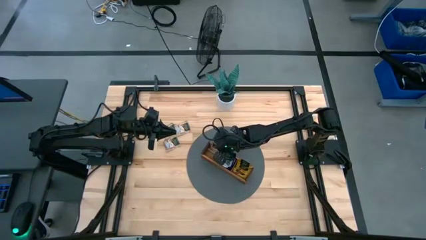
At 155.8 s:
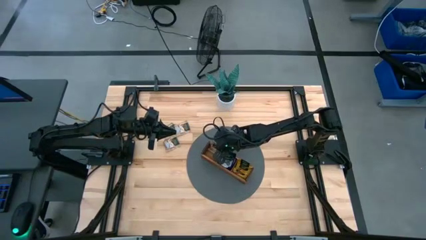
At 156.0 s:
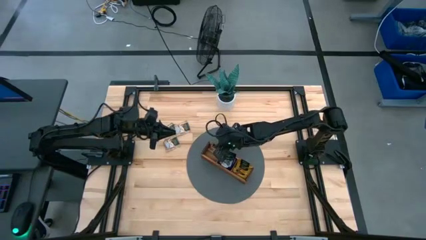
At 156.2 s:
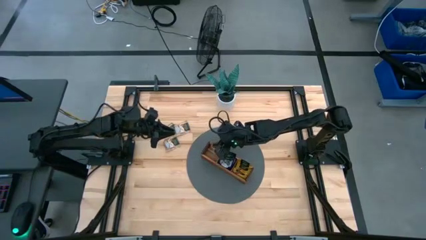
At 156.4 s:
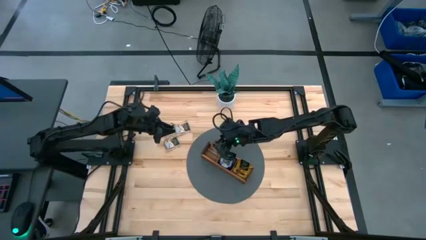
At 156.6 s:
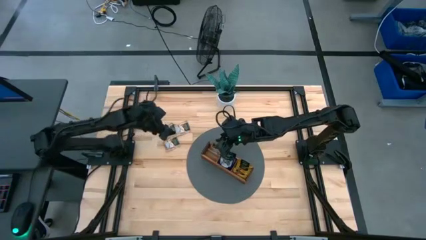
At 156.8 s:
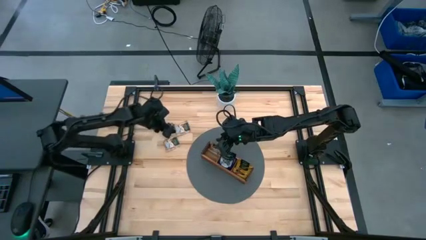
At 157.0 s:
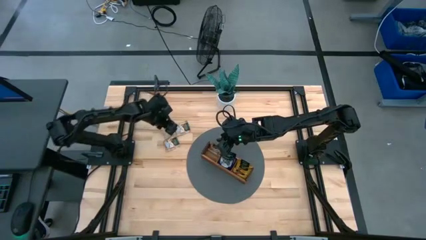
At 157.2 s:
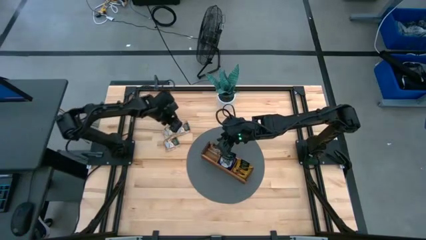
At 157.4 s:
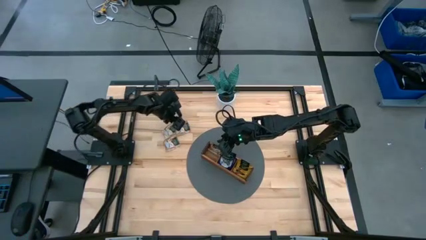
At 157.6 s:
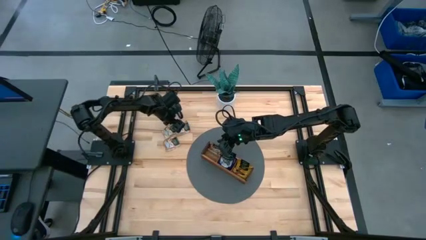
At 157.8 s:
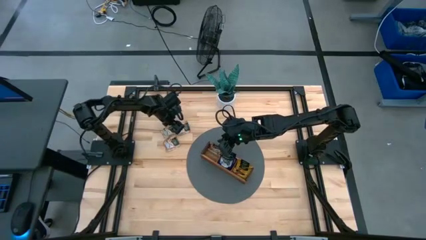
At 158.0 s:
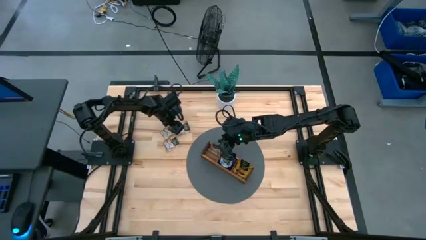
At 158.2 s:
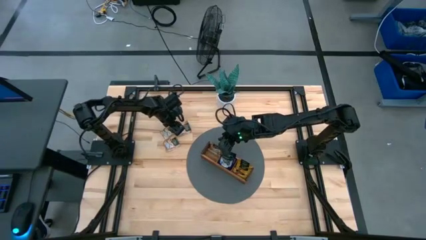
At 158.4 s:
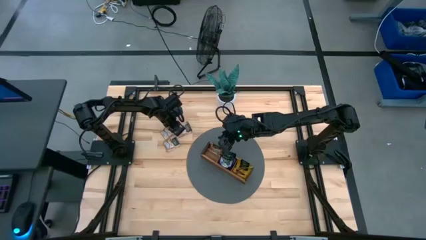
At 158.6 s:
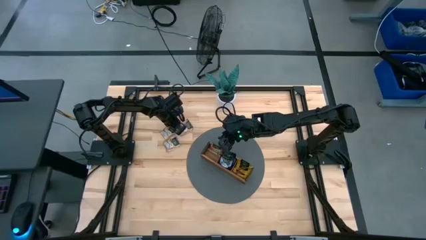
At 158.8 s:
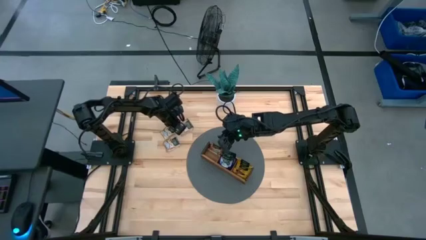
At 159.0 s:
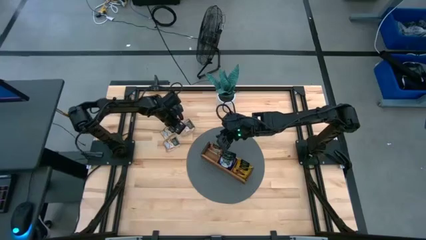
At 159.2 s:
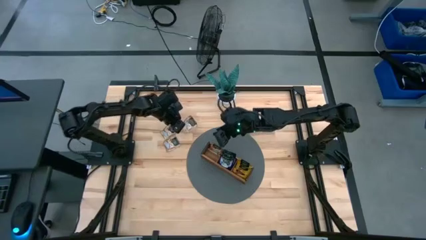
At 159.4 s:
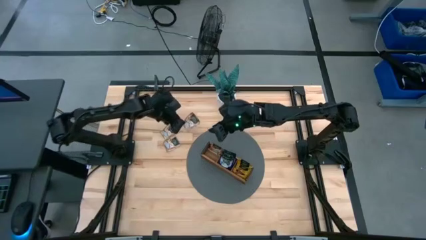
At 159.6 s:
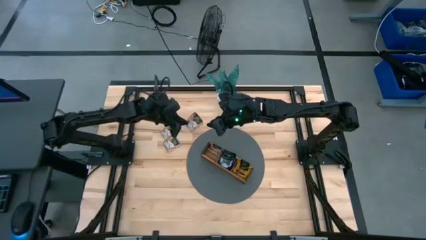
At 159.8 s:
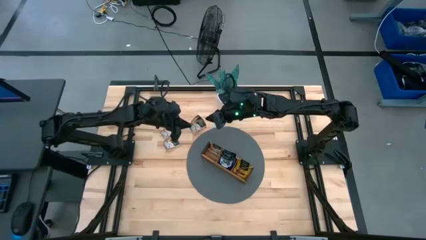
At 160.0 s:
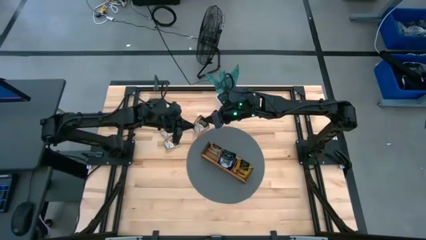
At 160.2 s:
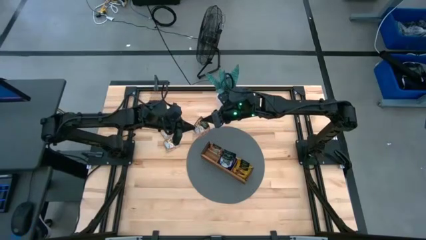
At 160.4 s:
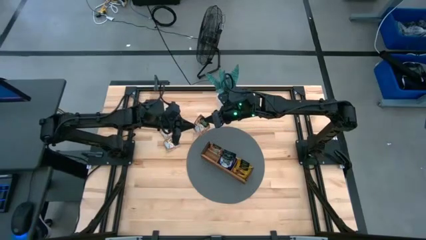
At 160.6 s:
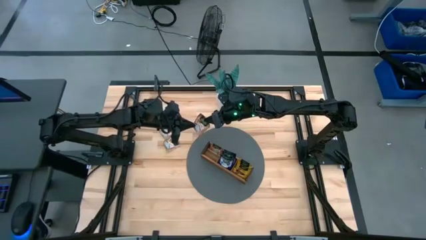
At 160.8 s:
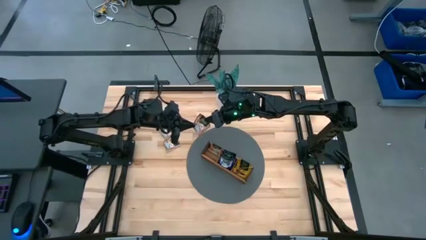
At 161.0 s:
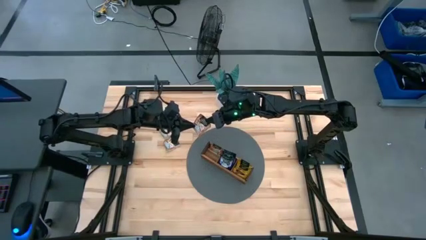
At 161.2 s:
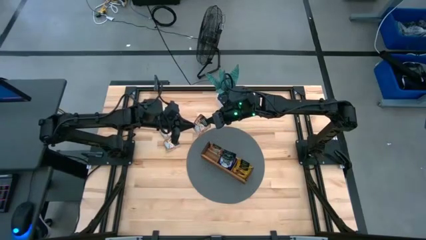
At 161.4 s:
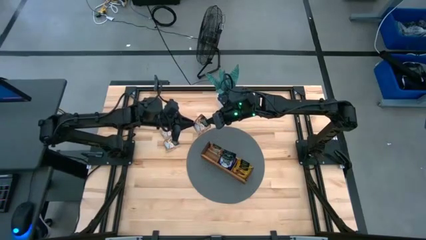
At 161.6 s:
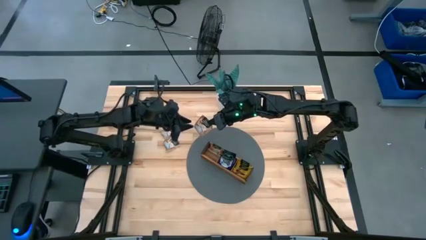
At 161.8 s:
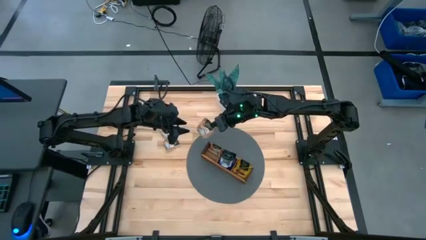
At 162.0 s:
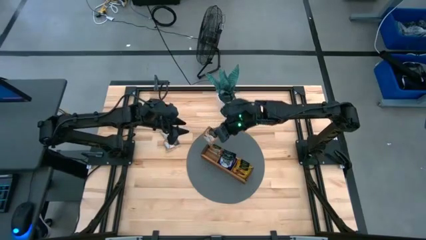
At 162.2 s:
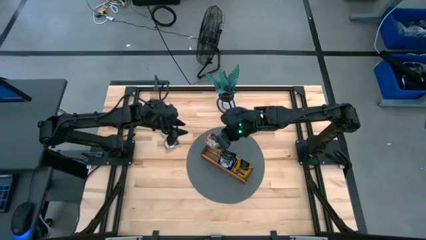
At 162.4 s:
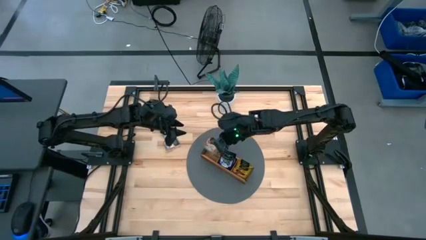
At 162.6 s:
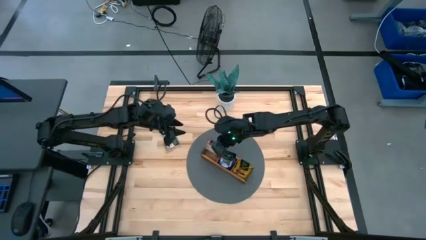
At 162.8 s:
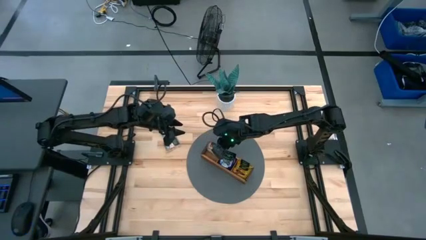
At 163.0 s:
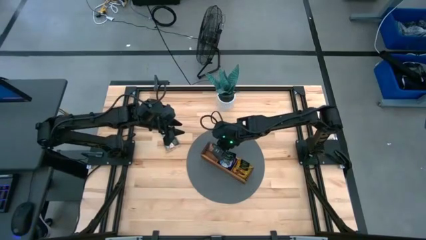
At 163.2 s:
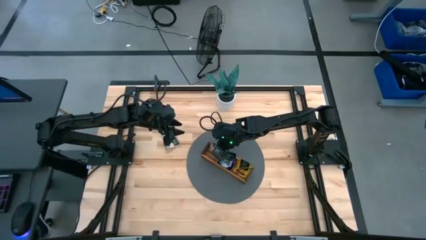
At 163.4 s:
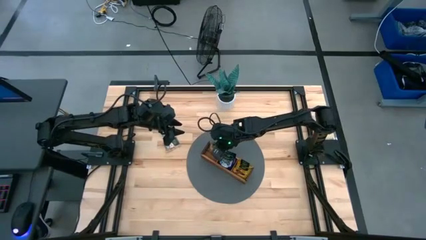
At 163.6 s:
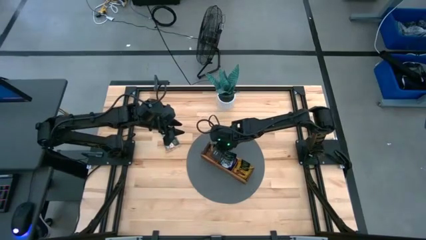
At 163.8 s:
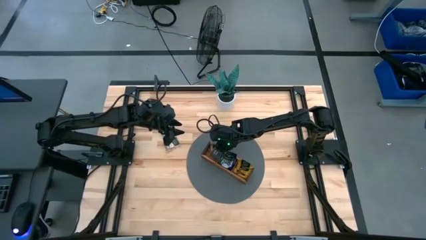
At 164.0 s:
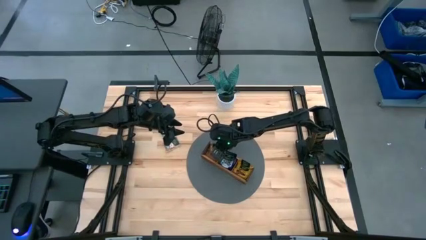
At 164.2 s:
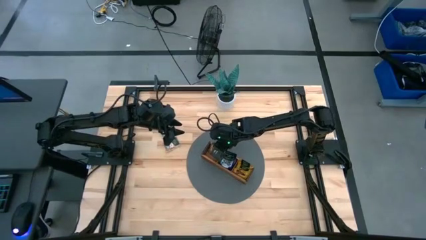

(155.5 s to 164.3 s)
Task: Pick & Place Tea
Put the brown tea bag into the left section of the wooden organizer

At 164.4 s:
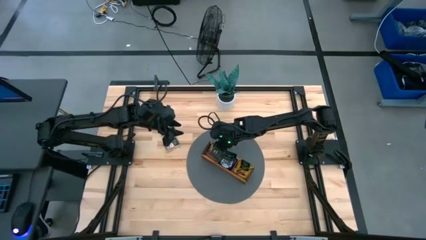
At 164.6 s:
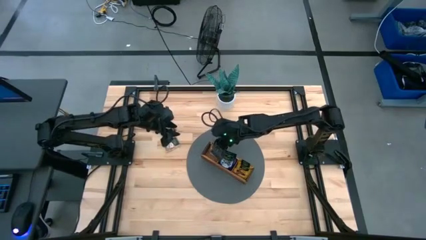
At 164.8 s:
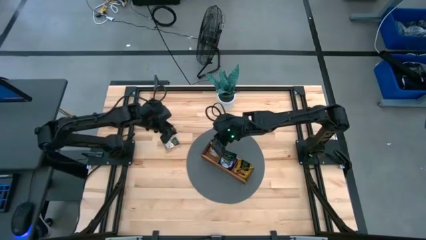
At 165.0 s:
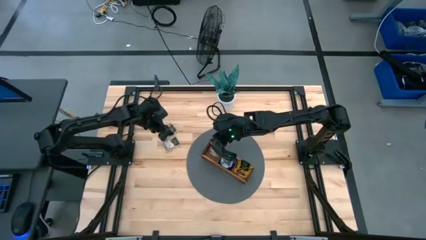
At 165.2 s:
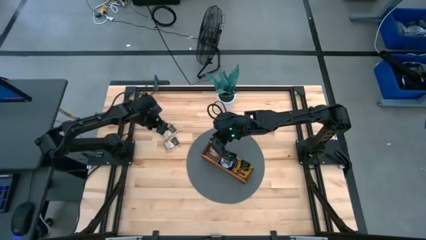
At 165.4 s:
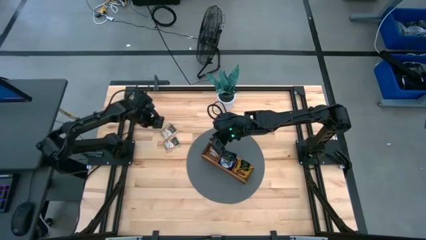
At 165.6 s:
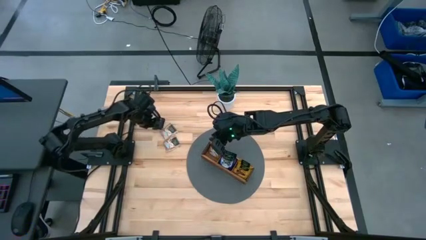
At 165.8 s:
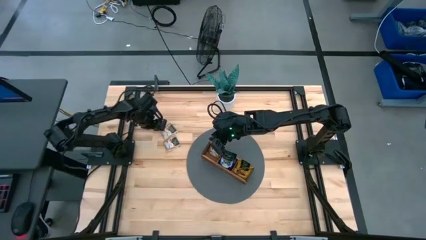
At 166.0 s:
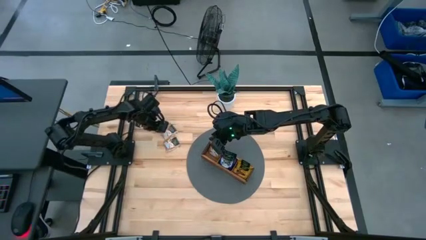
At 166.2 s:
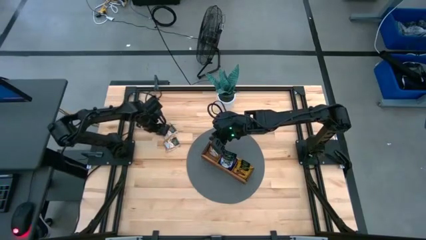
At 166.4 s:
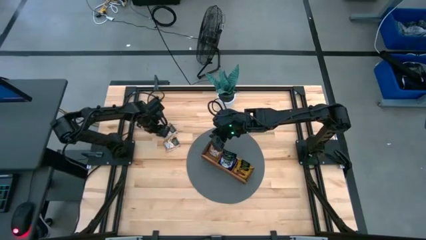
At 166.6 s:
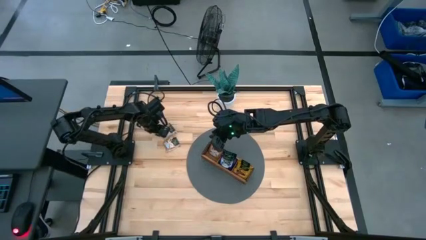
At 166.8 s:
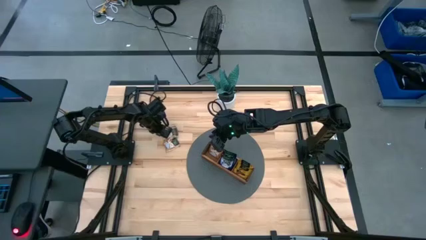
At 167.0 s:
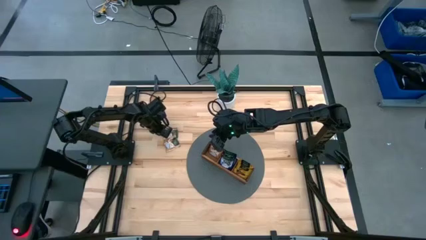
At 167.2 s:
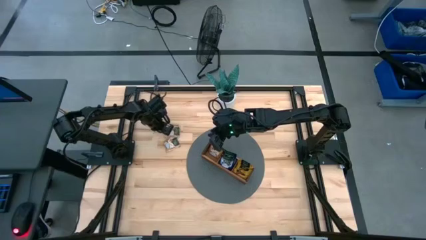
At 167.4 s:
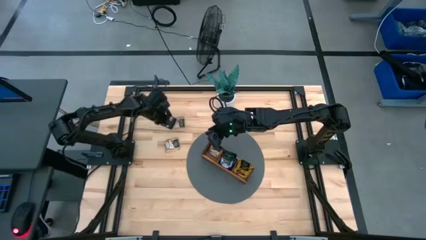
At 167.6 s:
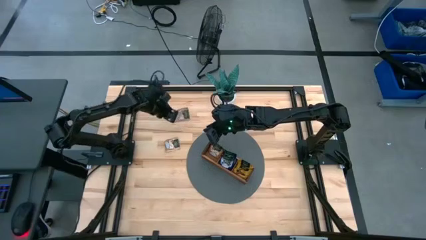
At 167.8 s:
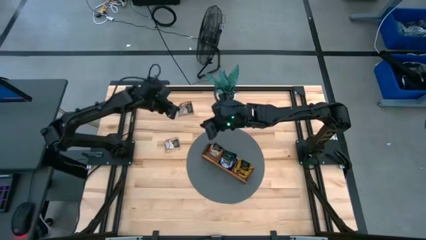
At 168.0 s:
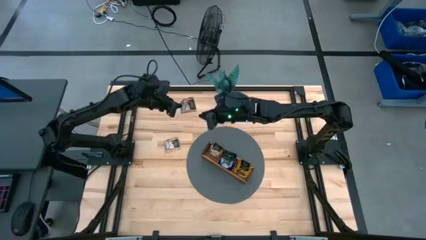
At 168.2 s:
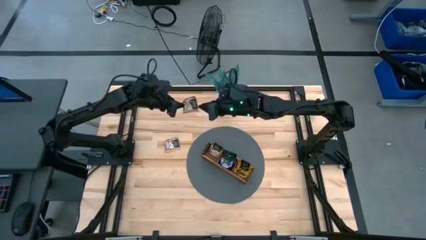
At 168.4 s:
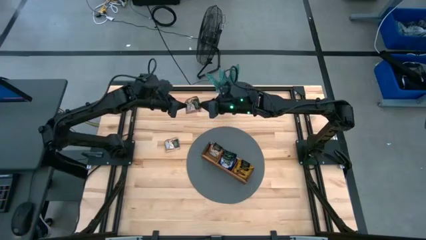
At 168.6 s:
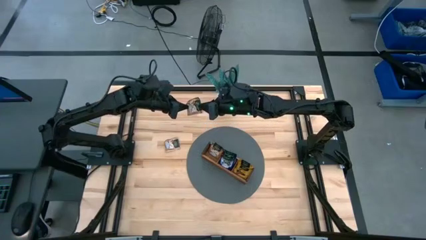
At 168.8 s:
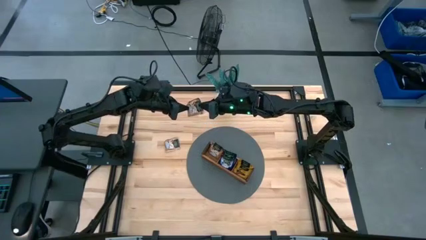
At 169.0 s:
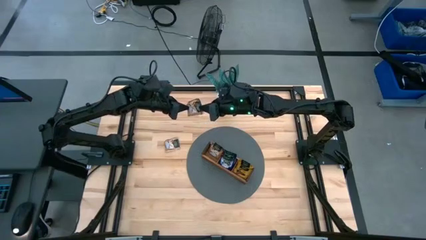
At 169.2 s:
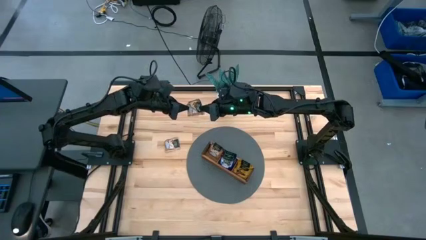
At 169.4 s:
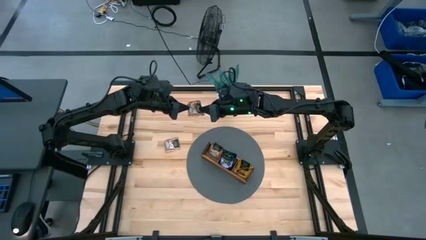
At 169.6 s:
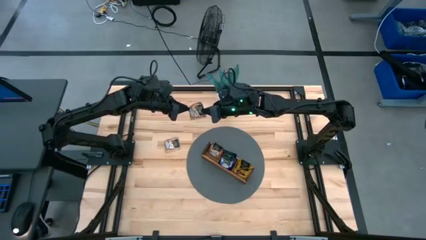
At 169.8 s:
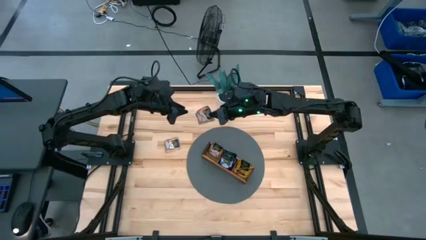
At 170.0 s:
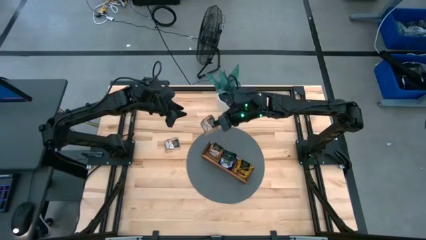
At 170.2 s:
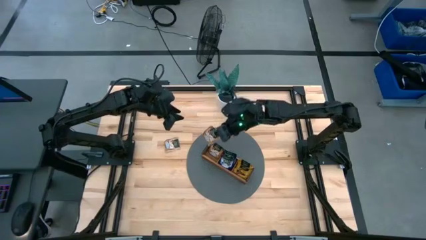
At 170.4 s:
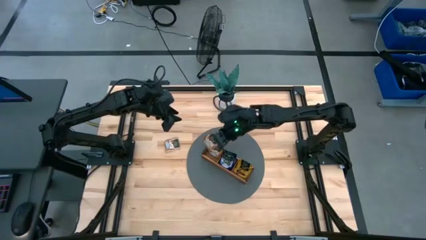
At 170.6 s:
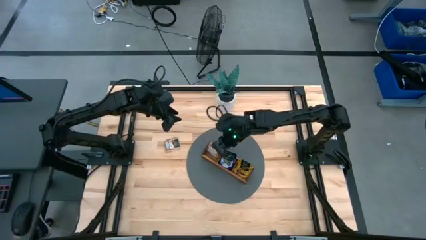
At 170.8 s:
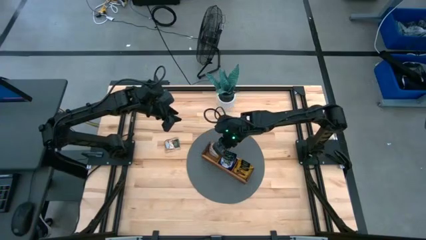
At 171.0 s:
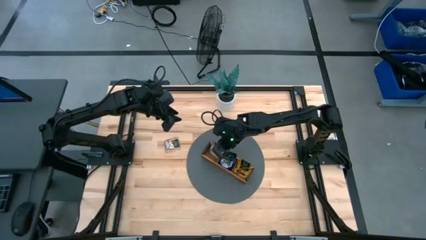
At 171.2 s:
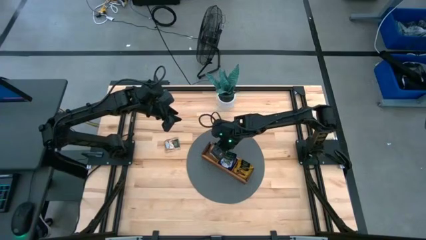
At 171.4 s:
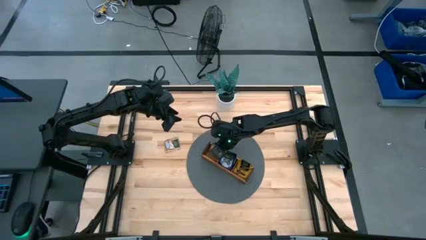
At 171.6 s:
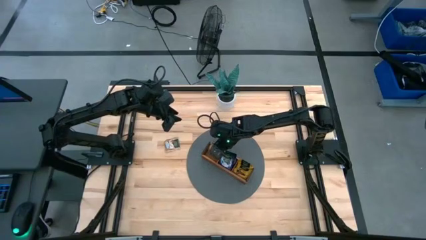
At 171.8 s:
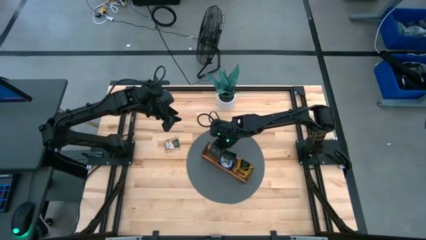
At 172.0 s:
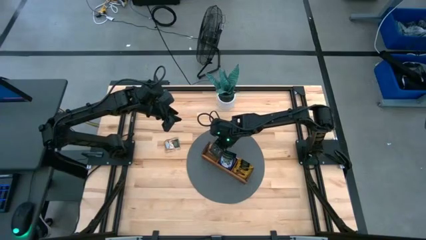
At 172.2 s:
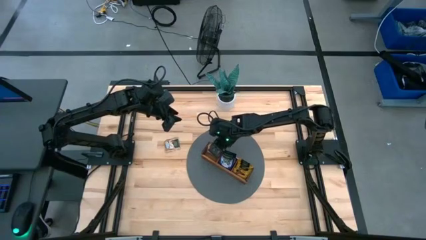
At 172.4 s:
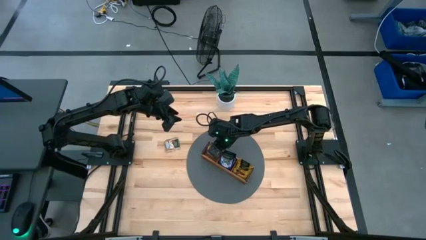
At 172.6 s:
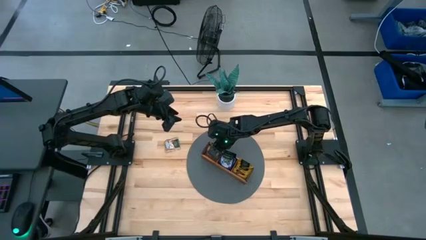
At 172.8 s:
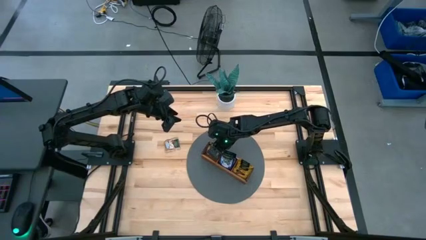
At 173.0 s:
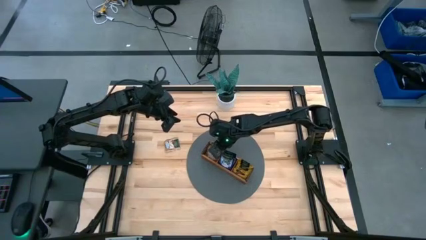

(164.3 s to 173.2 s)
Put the brown tea bag into the left section of the wooden organizer
